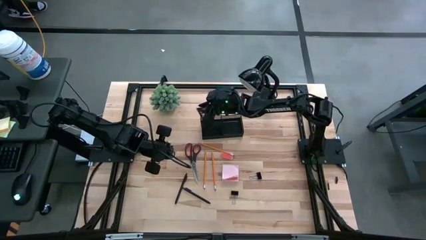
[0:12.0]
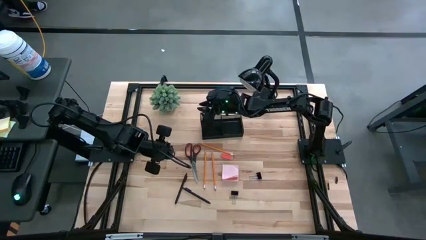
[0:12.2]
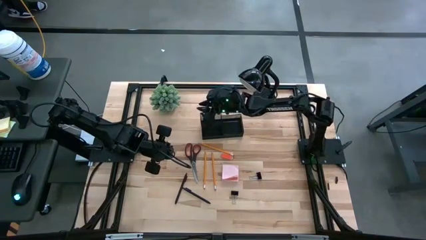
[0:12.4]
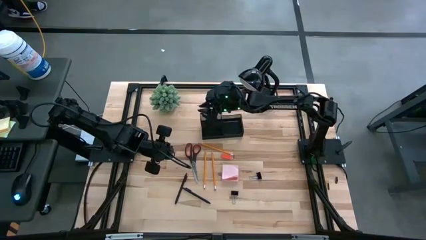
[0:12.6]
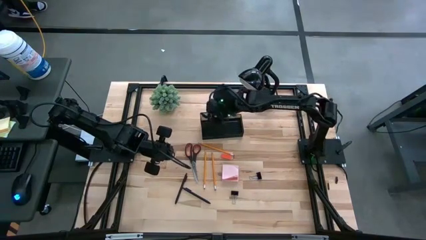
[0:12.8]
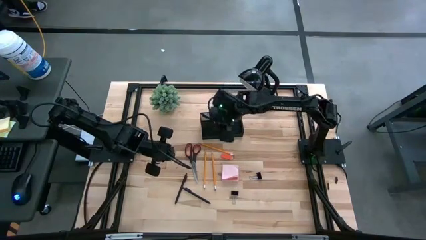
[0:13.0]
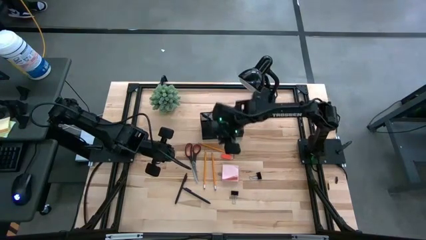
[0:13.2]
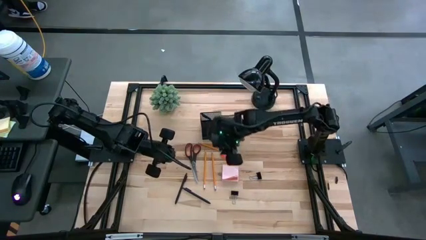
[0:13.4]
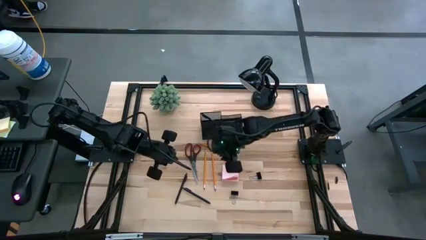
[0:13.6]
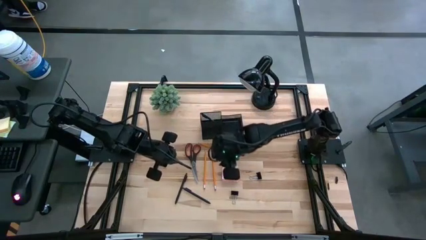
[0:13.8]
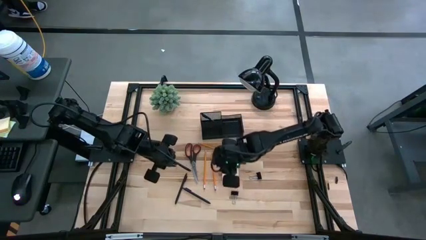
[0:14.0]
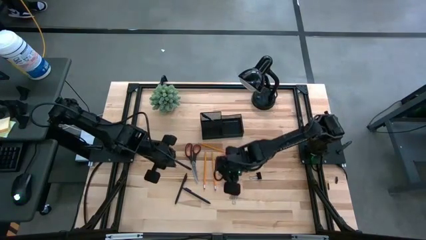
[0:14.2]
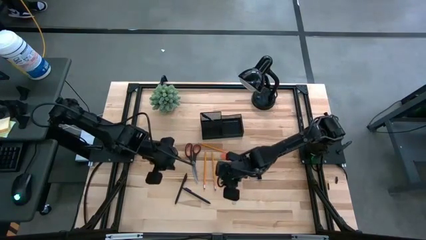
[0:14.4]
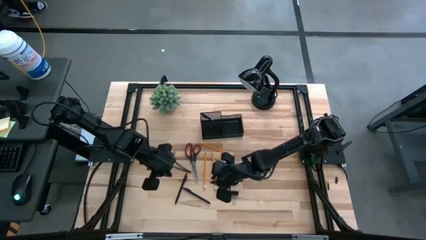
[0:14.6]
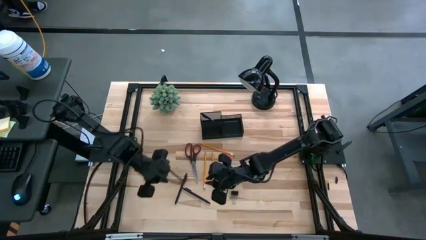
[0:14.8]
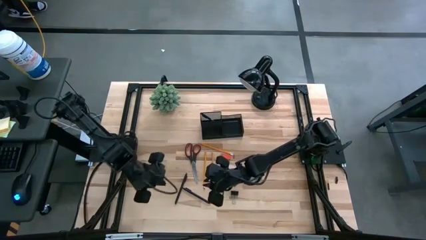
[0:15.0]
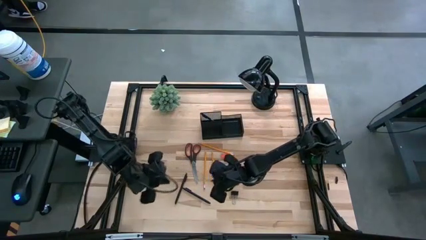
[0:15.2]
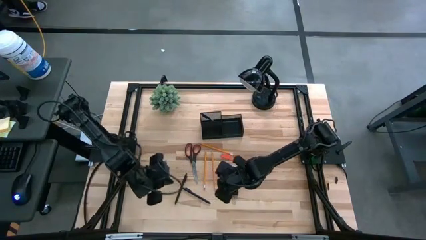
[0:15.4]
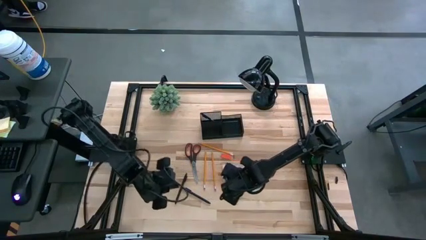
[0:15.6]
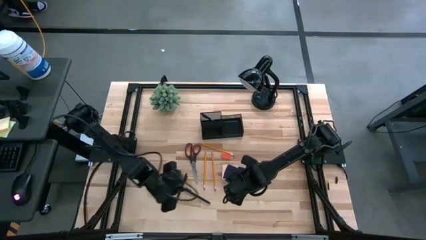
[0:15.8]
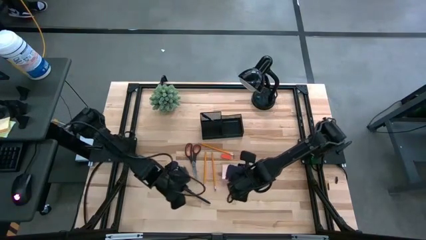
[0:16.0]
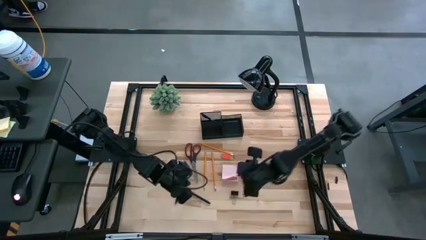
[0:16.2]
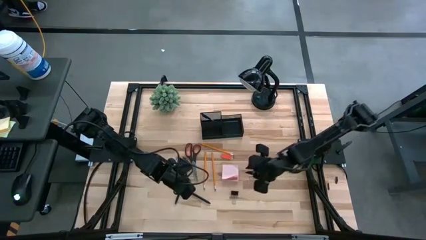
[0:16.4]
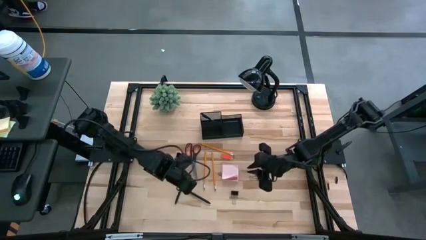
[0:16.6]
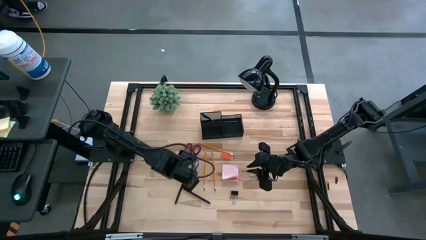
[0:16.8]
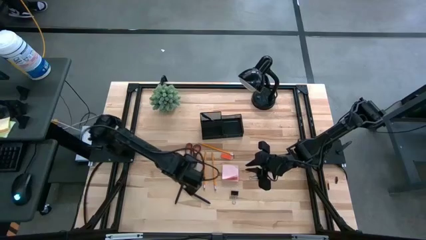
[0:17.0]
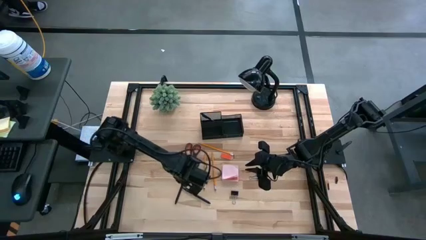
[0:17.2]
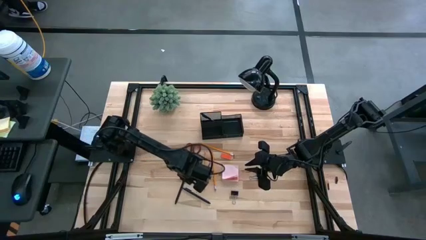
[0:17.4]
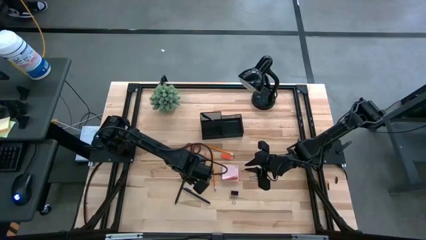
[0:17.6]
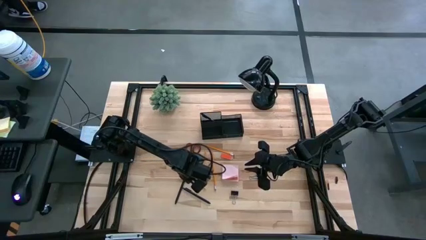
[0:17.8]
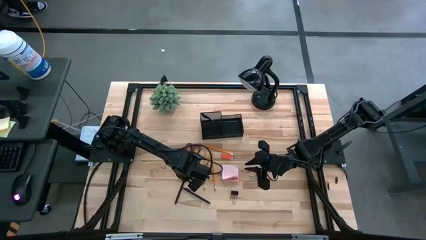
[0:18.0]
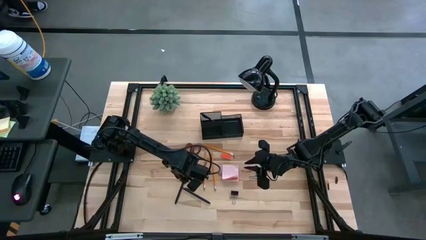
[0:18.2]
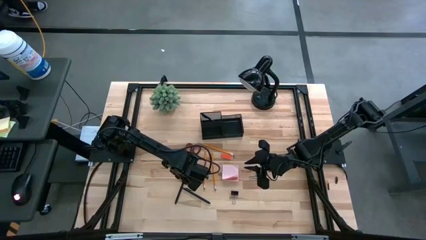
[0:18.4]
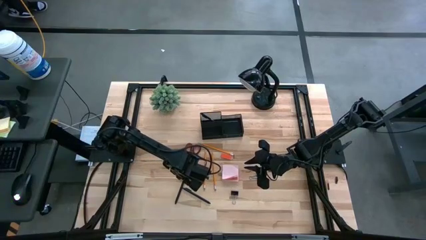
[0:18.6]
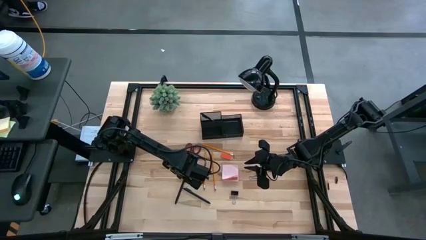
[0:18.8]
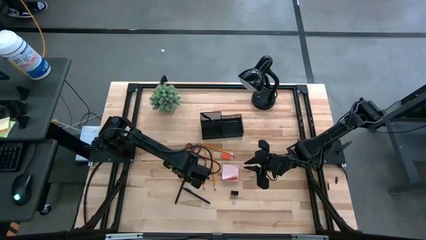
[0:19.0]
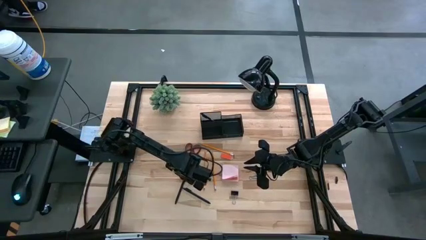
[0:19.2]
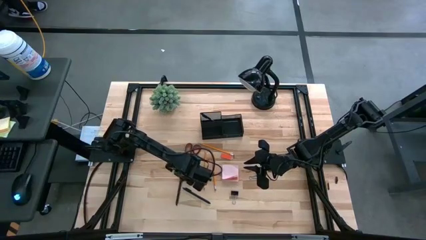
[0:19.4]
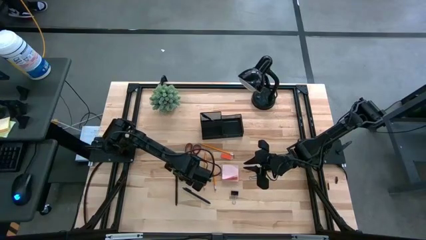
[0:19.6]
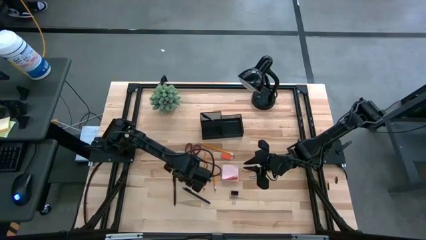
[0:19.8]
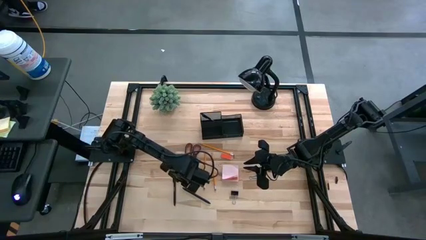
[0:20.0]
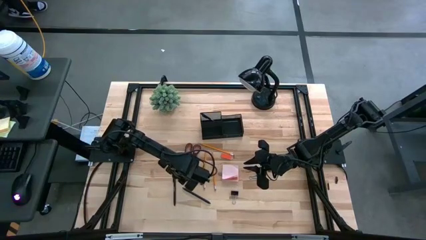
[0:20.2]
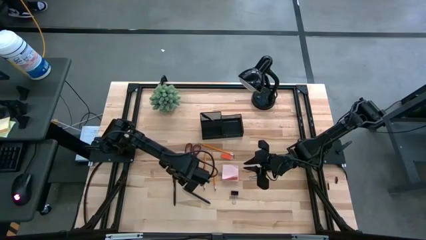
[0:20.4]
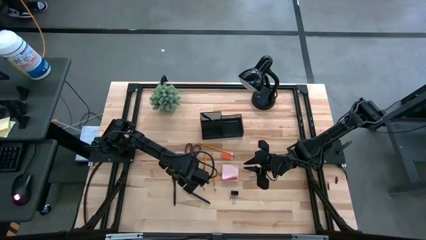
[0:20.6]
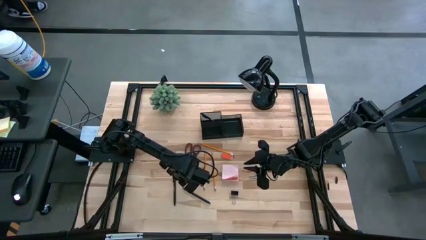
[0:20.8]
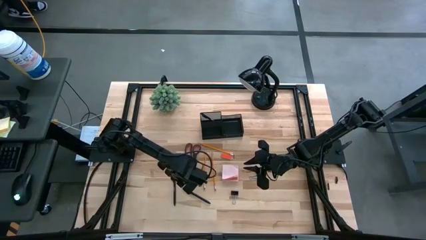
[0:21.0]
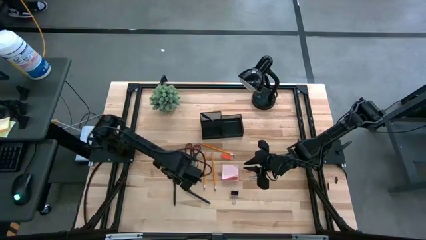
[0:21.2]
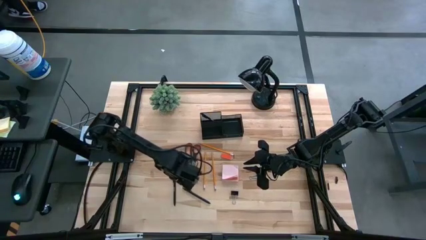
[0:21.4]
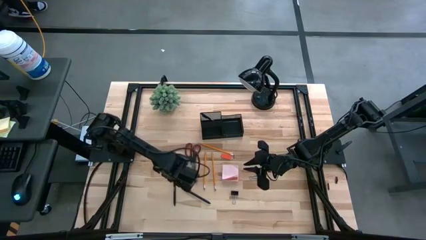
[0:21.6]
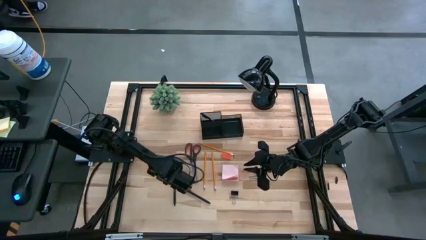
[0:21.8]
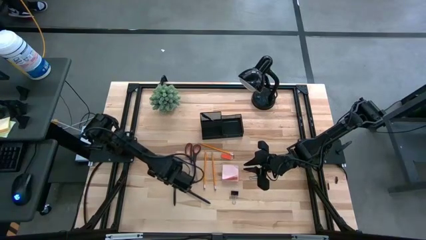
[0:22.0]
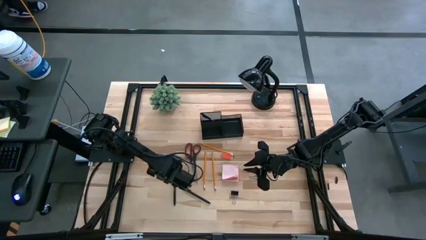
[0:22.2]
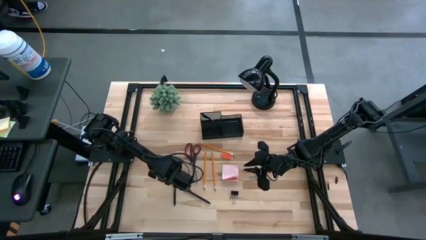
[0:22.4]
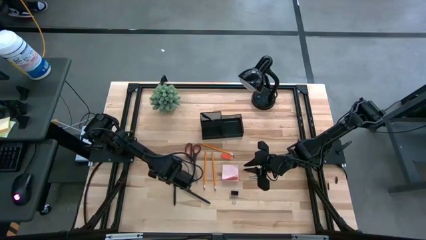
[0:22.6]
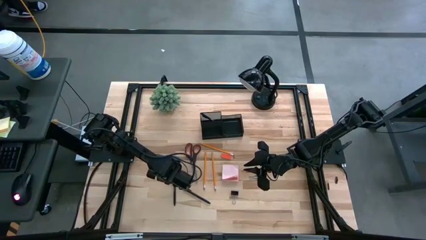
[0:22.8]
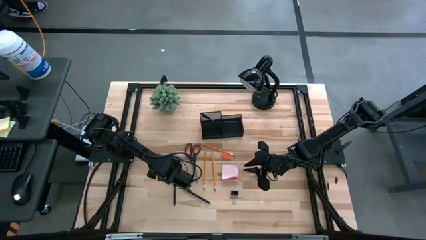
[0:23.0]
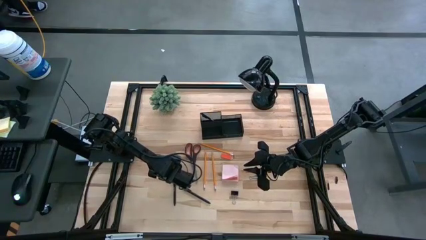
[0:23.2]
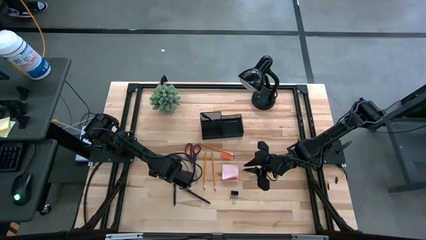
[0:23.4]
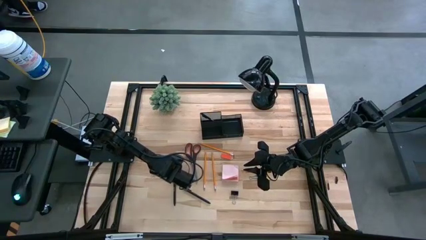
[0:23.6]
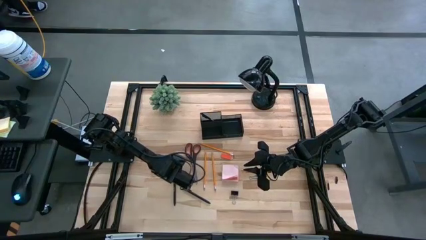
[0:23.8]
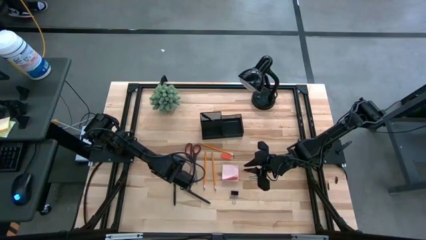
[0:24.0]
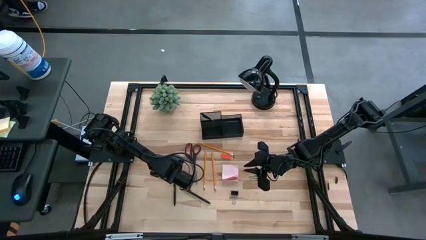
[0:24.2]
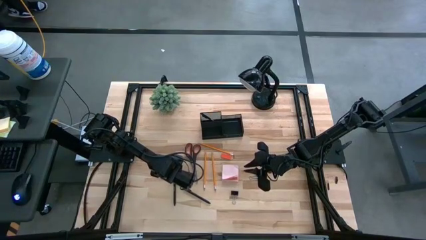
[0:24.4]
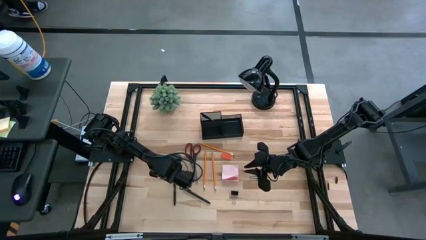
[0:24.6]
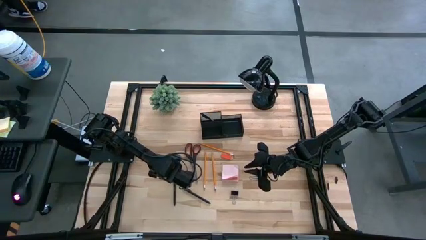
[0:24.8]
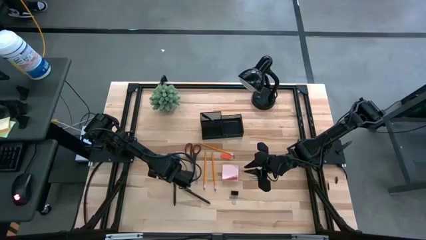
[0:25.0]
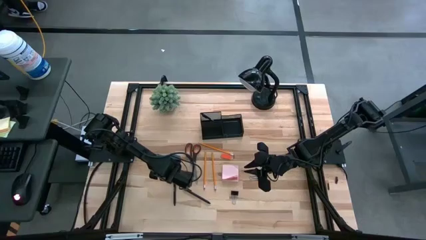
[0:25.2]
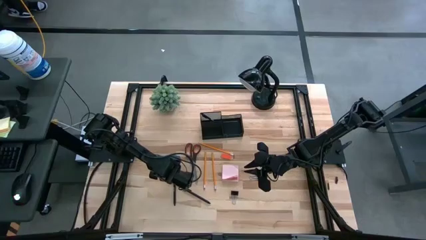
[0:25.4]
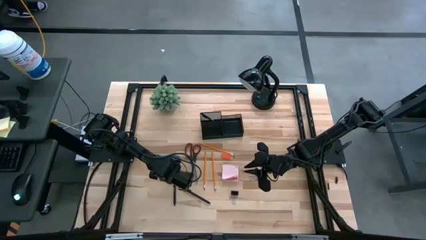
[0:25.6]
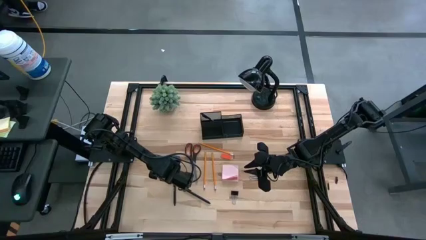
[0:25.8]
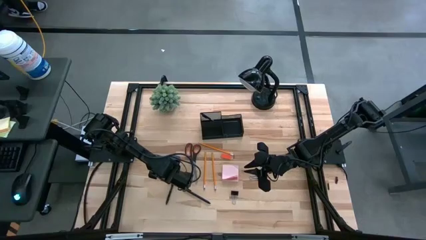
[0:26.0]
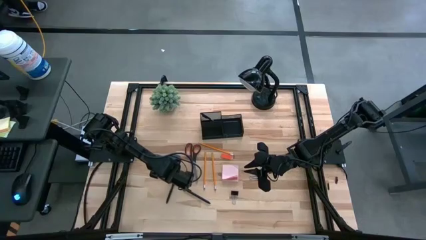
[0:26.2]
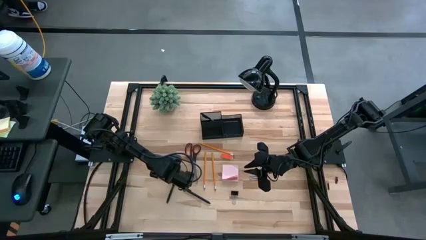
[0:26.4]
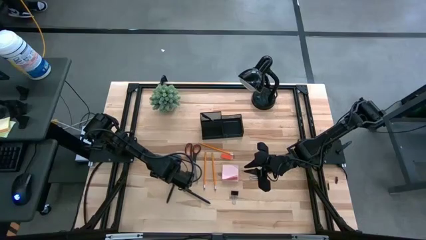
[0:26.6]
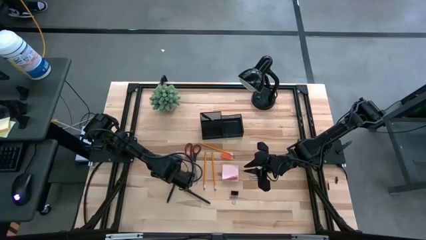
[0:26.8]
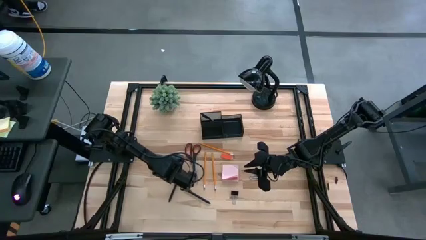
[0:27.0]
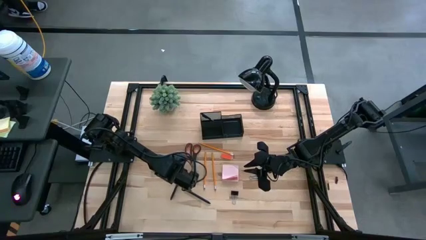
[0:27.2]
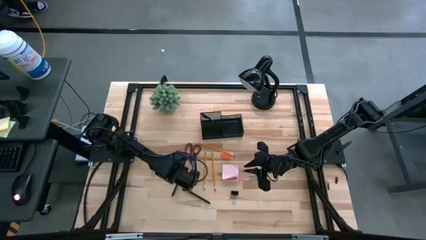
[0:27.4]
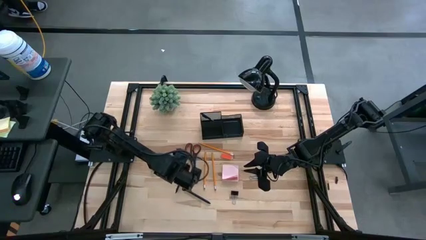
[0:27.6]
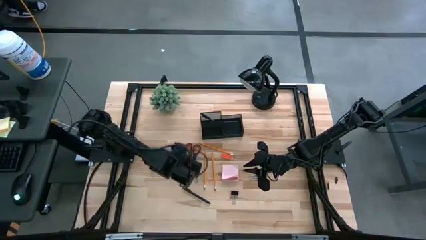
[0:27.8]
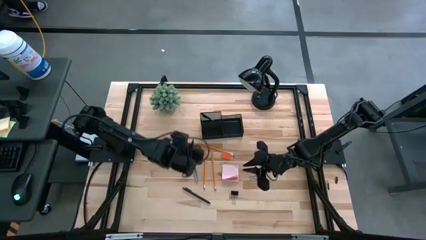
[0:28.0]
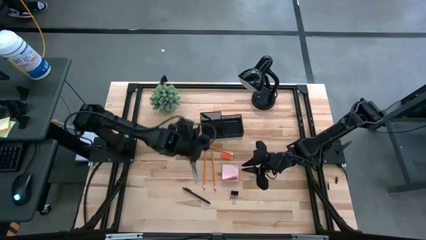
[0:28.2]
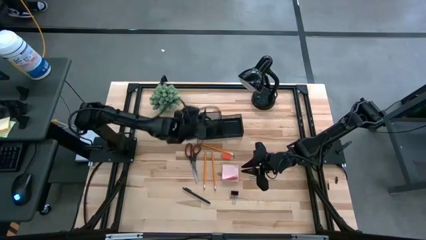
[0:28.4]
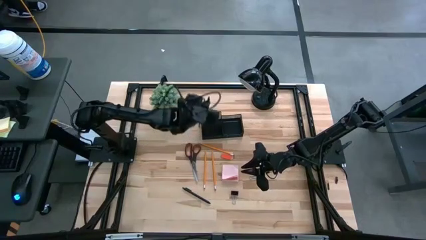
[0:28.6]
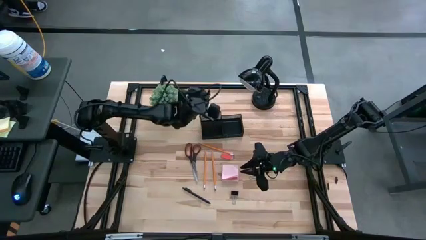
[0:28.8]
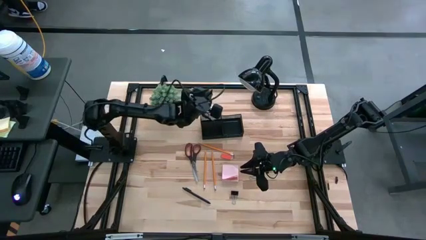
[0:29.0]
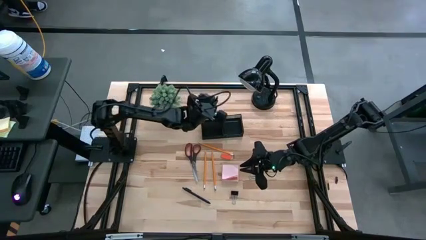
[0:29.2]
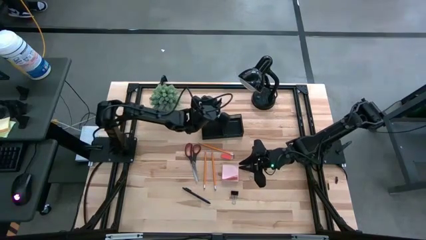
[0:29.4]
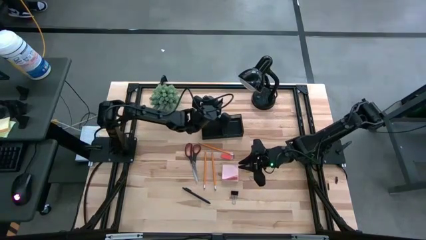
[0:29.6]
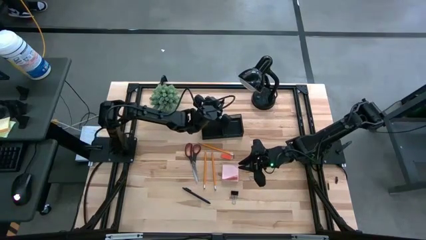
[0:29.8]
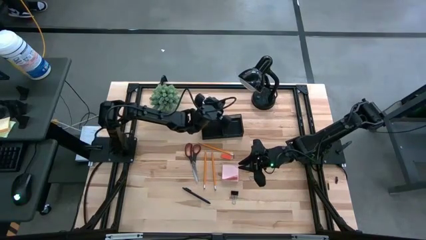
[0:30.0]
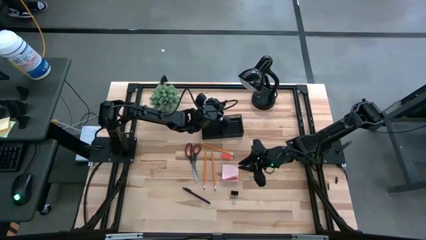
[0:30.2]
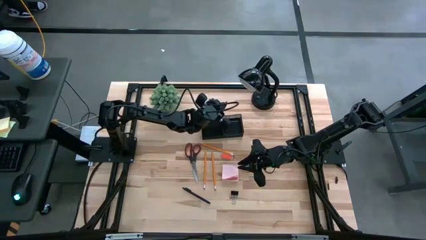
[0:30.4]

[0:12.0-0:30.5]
Task: Pick and place office supplies into organizer
Put the left black pen into the desk organizer
